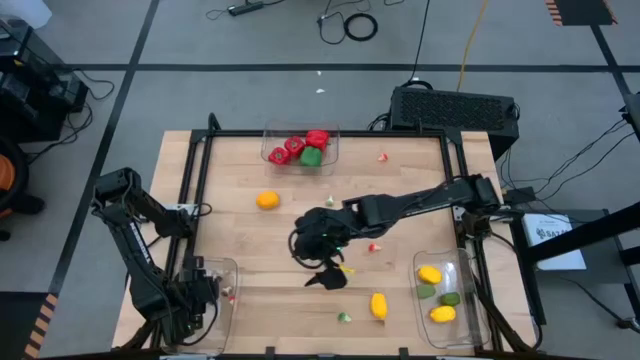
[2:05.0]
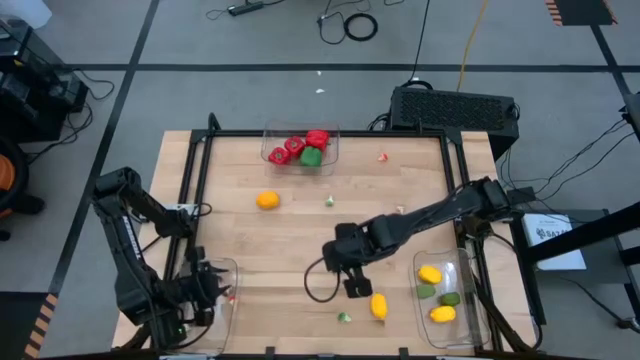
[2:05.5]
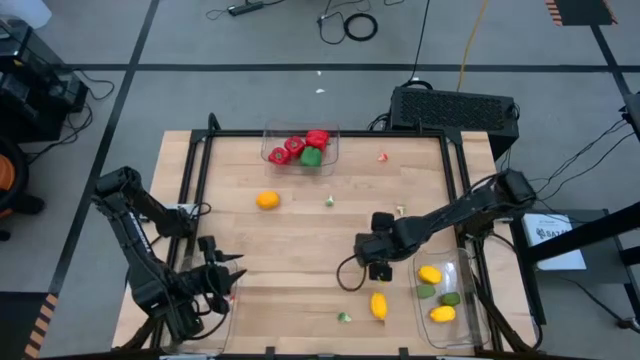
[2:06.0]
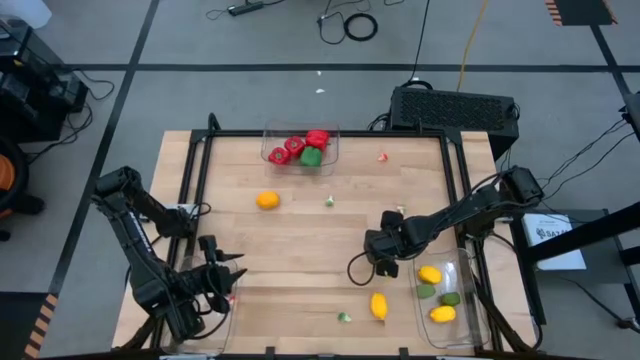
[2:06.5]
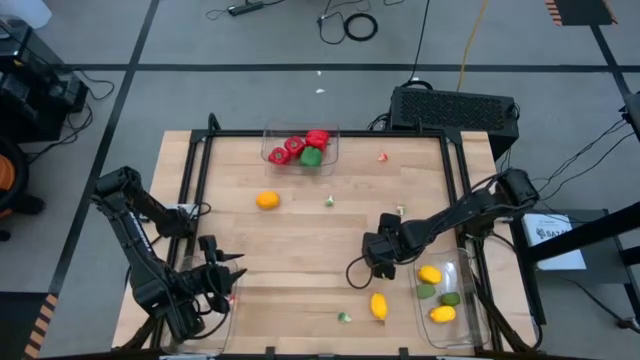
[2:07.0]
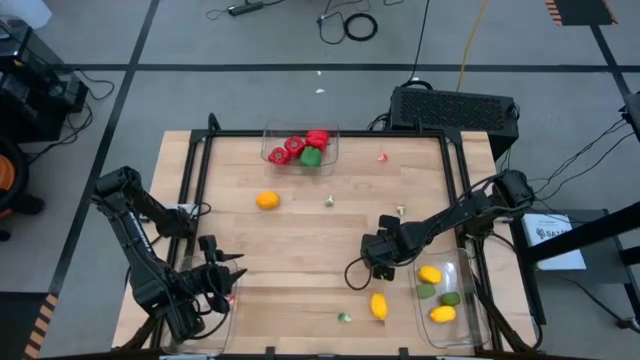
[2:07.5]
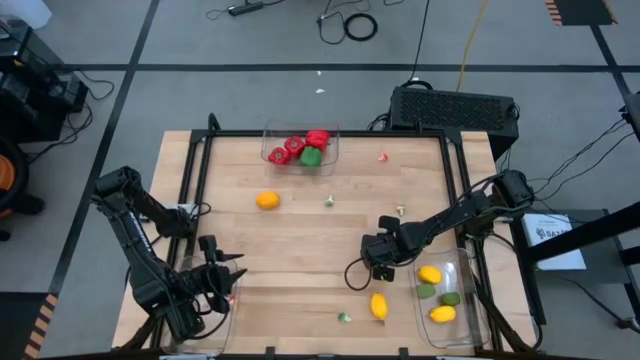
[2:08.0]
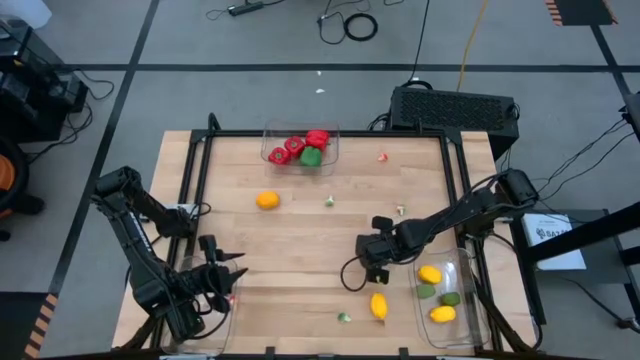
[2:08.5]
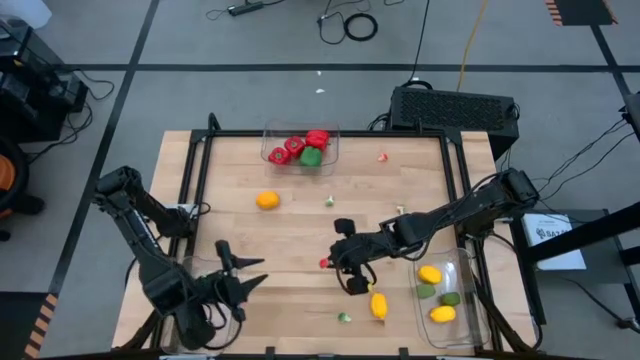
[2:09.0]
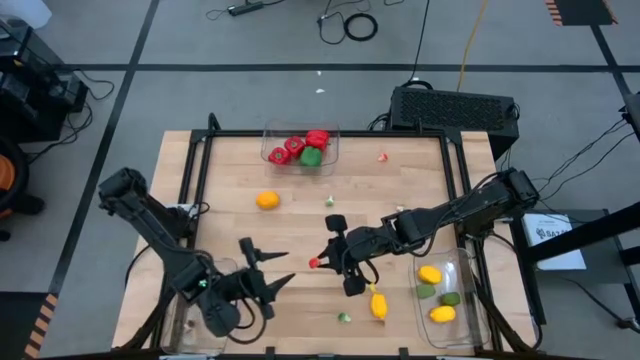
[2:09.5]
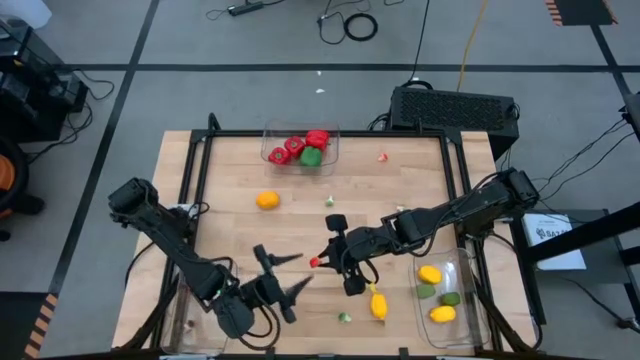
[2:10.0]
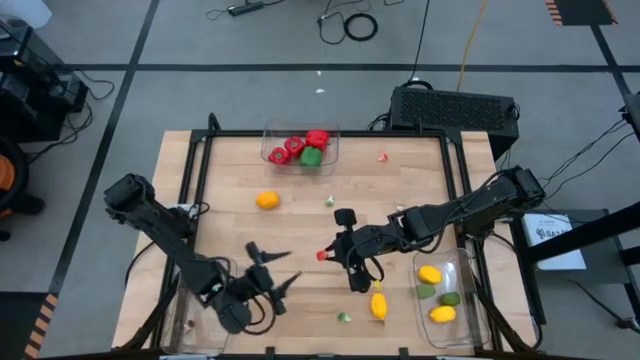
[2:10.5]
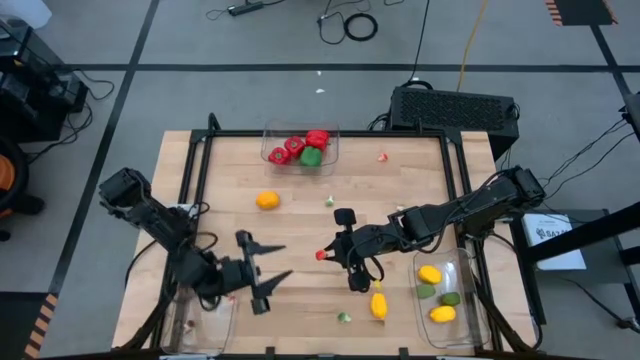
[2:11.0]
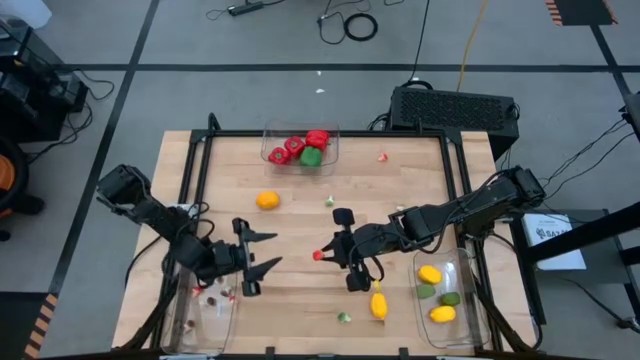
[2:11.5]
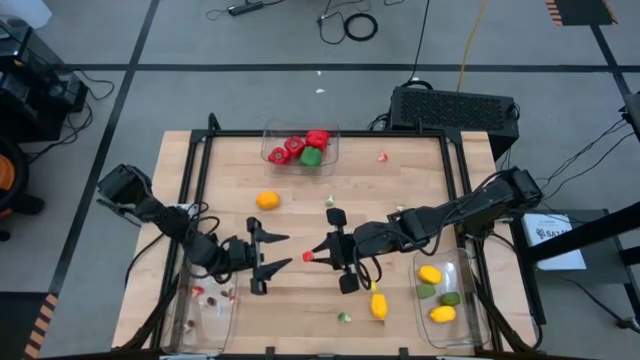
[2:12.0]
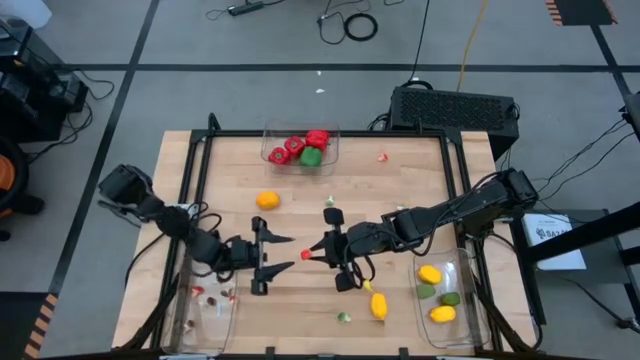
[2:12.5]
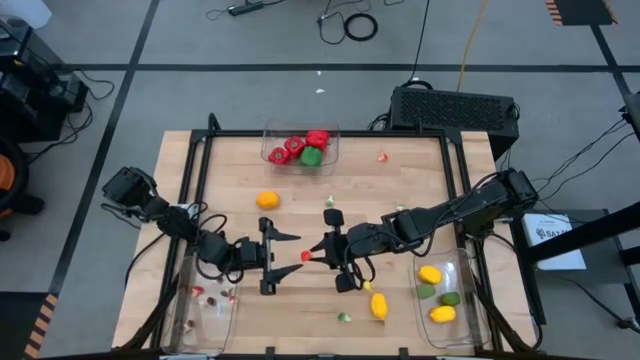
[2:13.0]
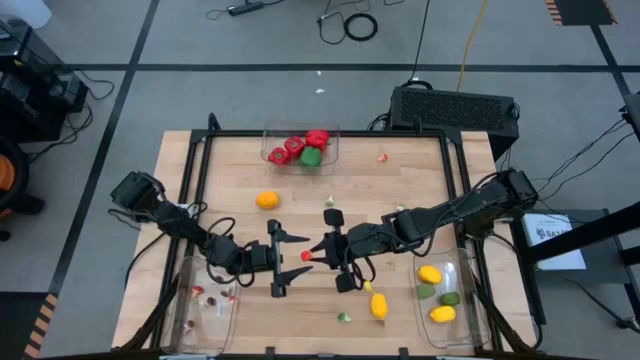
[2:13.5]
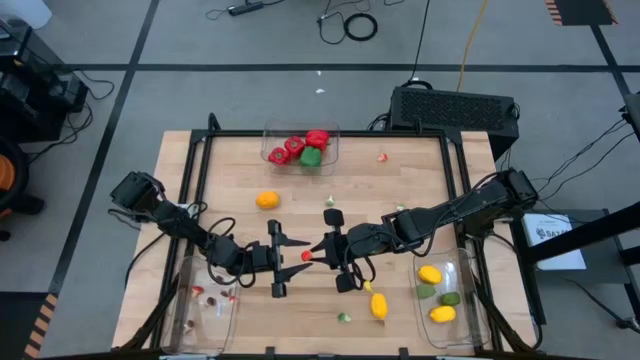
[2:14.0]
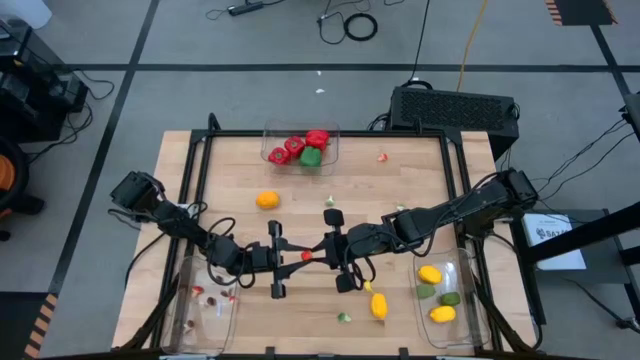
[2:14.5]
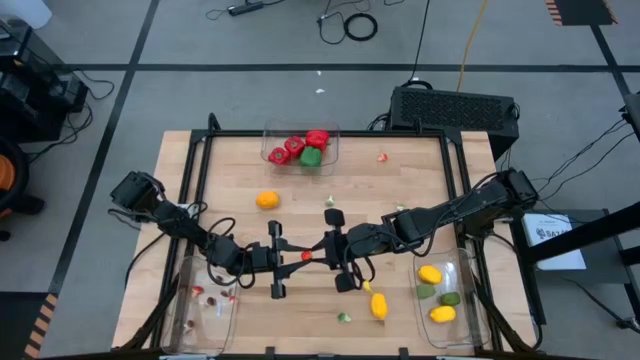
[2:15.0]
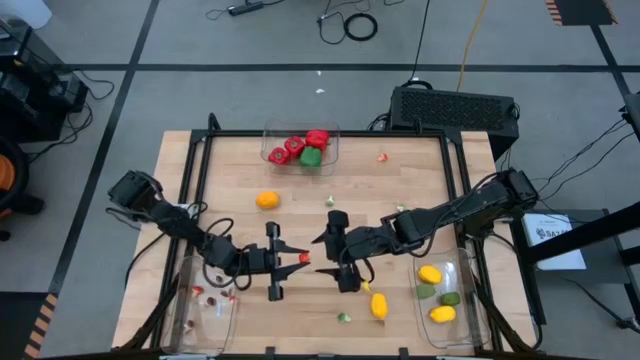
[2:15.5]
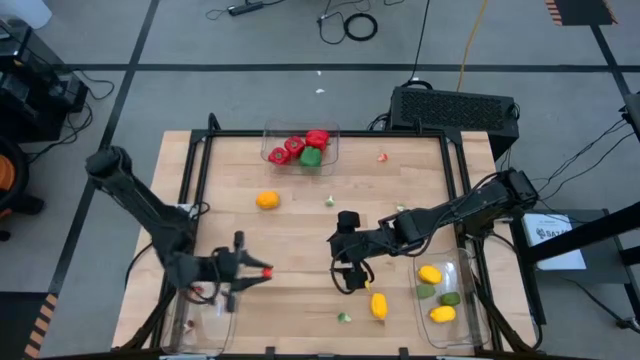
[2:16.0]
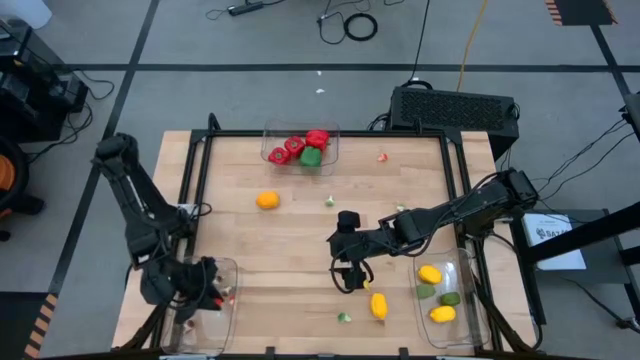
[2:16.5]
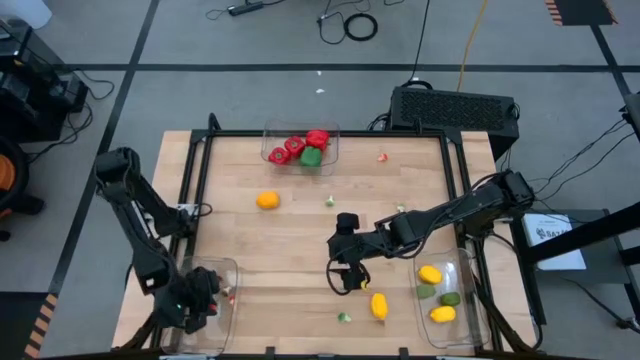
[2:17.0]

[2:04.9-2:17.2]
Task: Sort produce into baskets
Put the red mushroom into the bottom left transparent bin

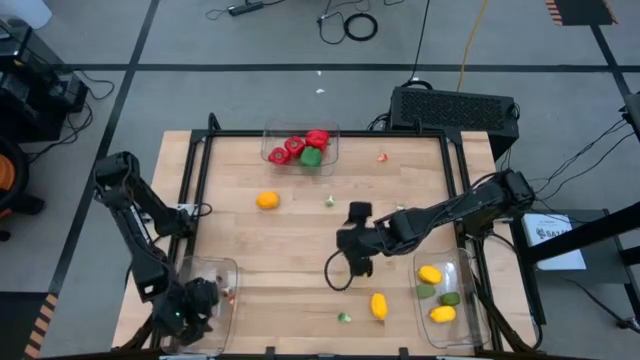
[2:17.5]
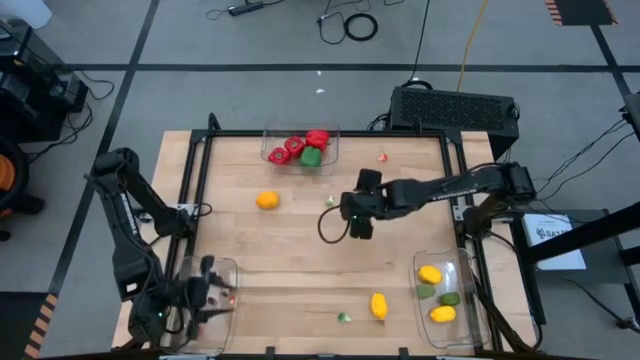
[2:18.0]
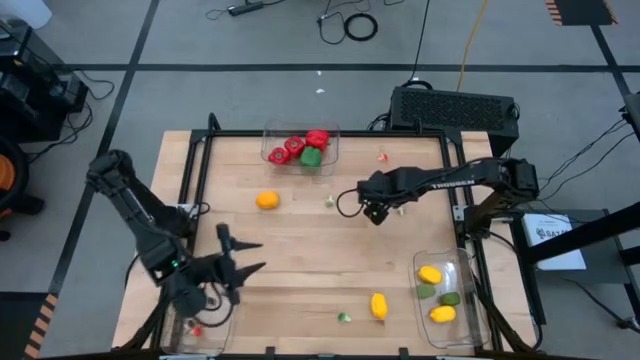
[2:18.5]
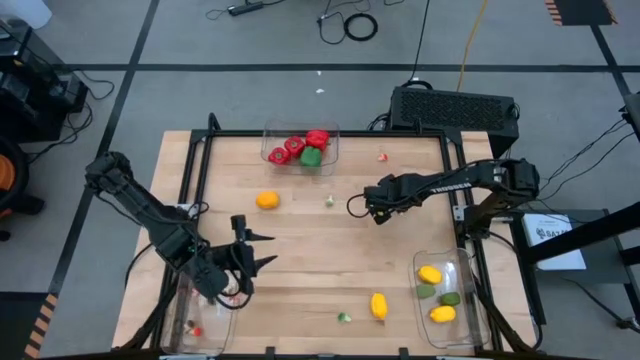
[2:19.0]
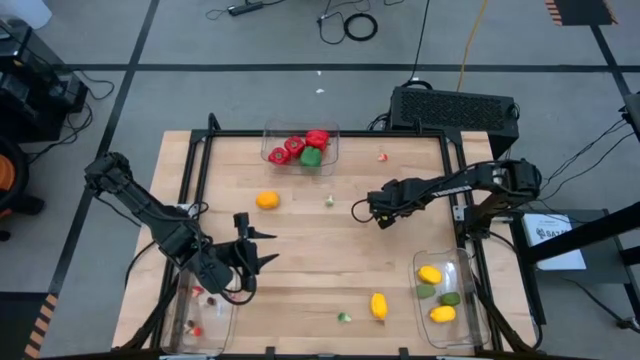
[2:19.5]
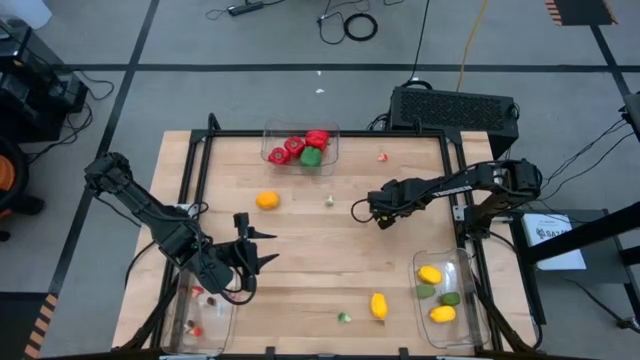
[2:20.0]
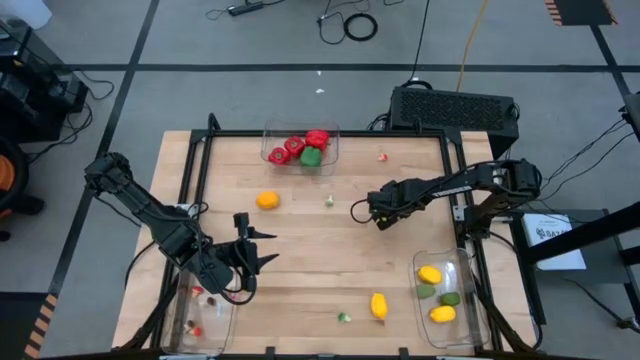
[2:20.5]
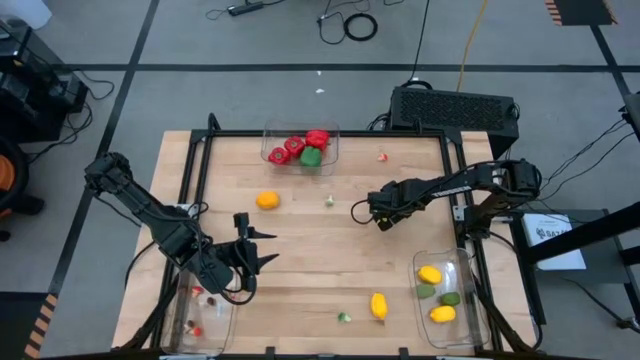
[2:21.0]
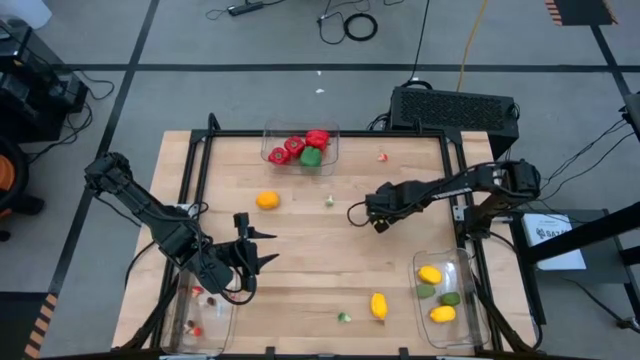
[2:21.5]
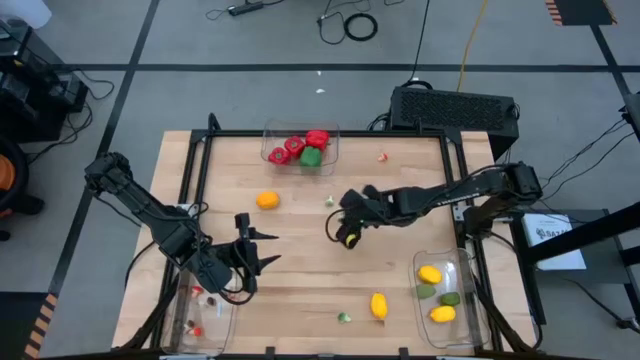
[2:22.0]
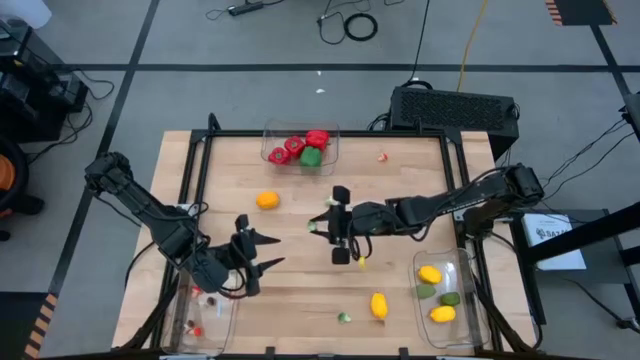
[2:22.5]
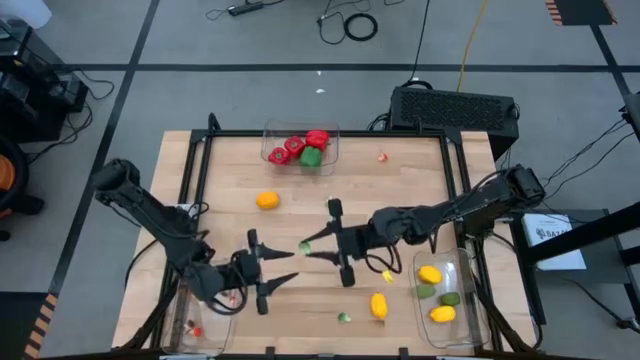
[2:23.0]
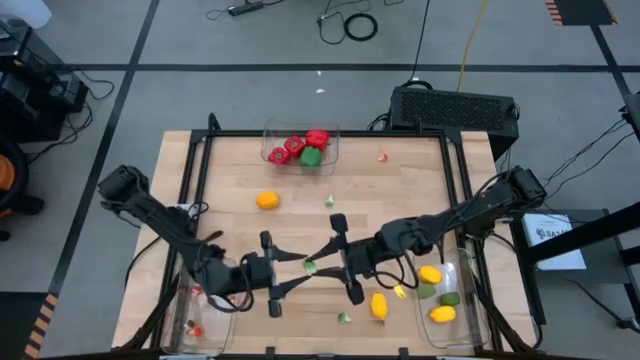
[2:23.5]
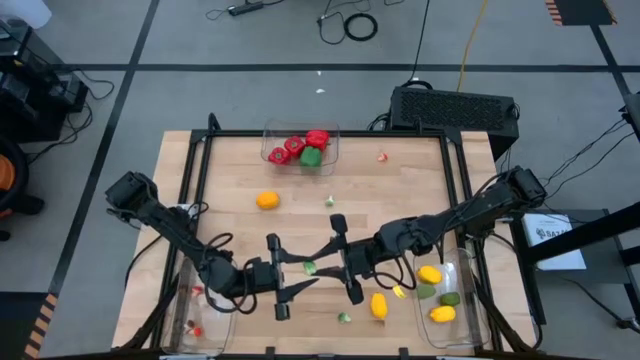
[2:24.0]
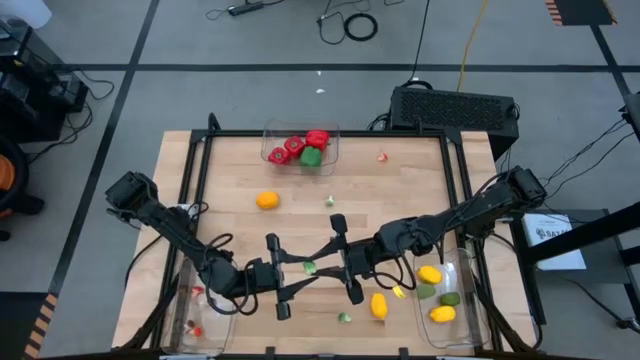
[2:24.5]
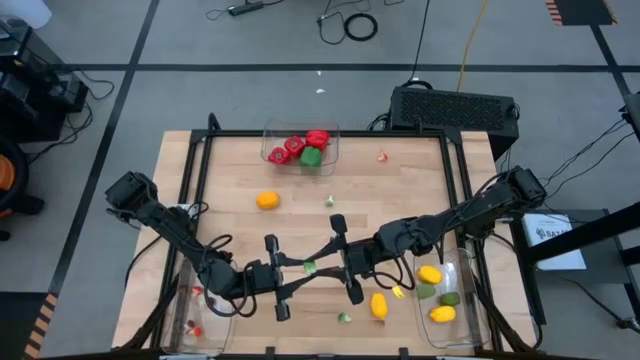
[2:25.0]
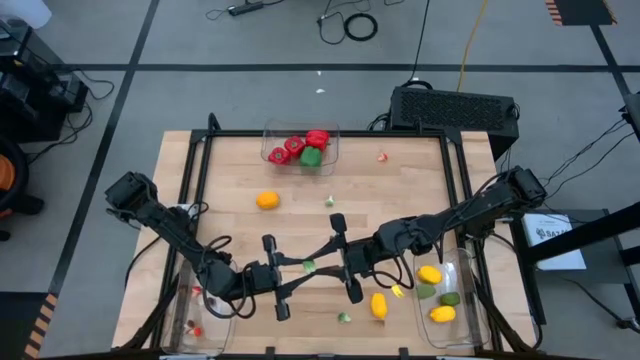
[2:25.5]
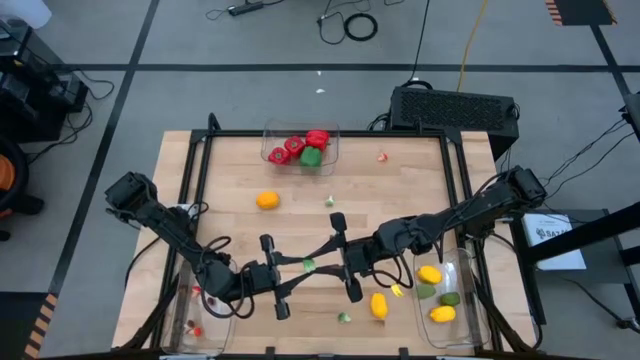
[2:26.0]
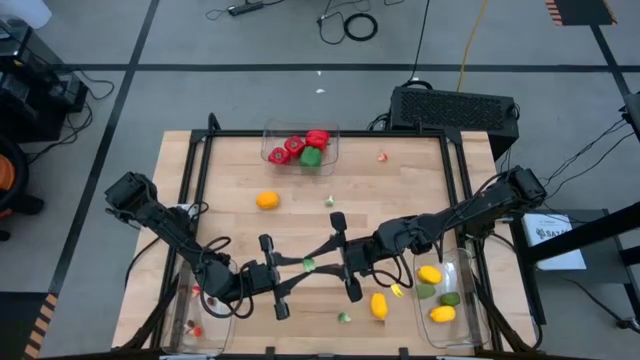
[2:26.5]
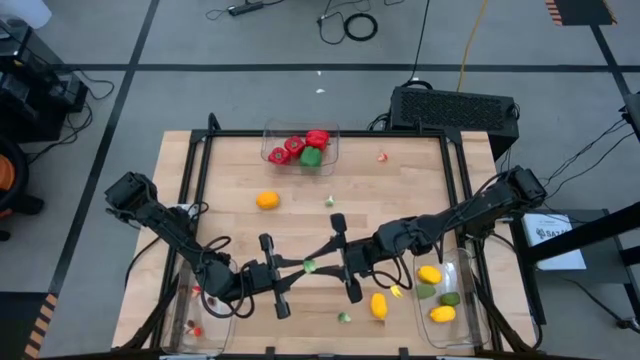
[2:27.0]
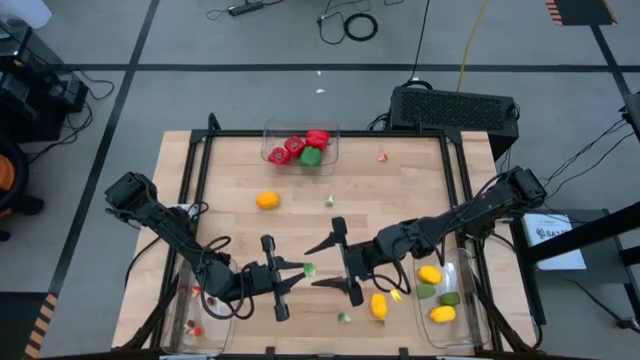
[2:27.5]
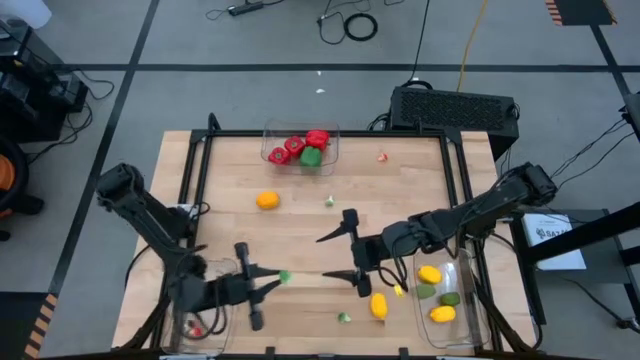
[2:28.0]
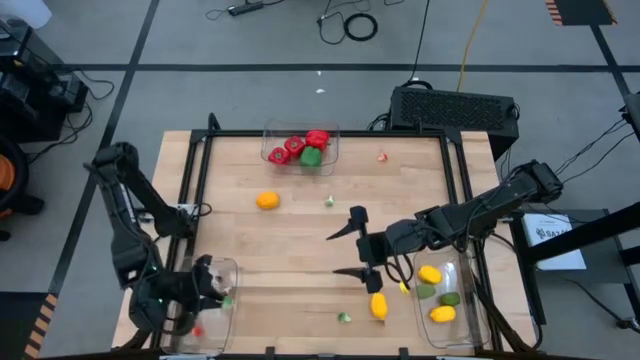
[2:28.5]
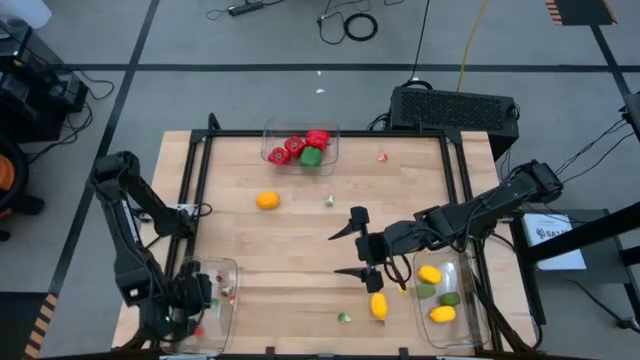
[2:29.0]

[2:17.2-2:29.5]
Put the green mushroom into the bottom left transparent bin
